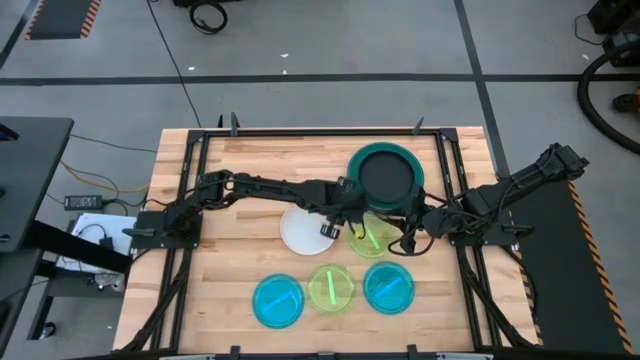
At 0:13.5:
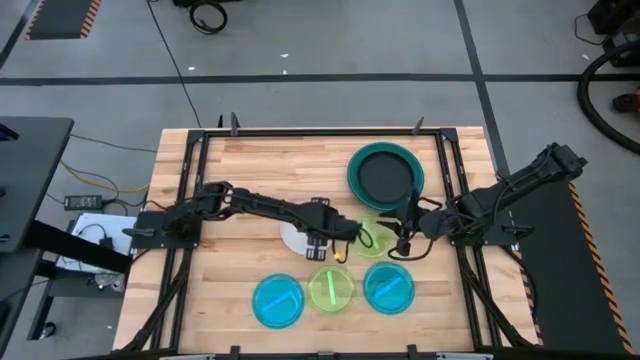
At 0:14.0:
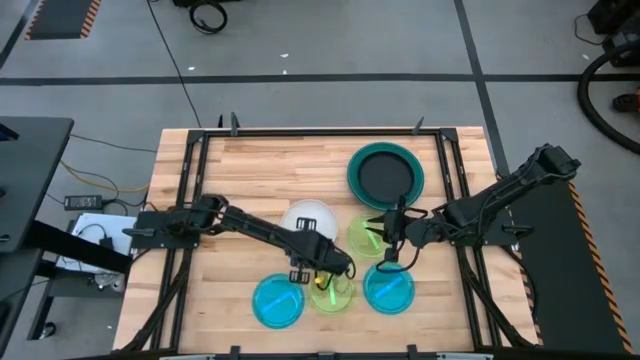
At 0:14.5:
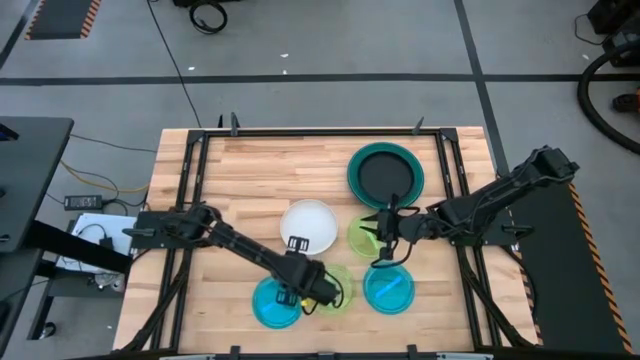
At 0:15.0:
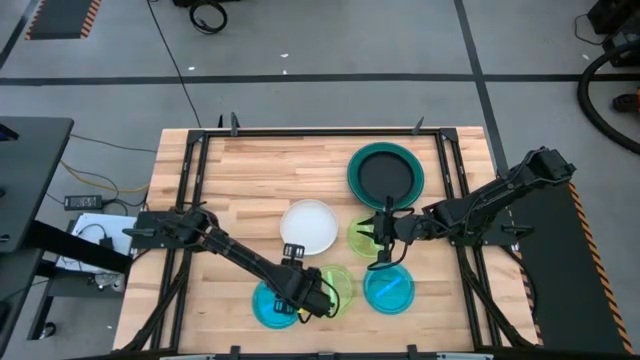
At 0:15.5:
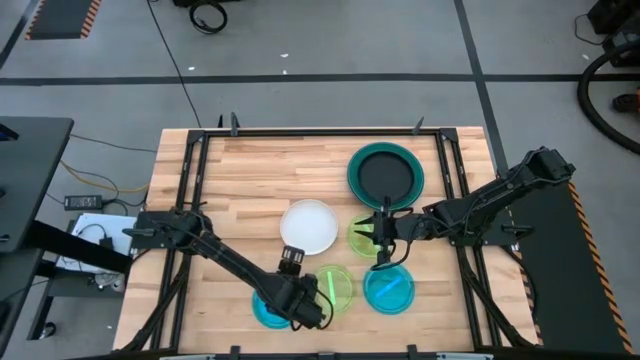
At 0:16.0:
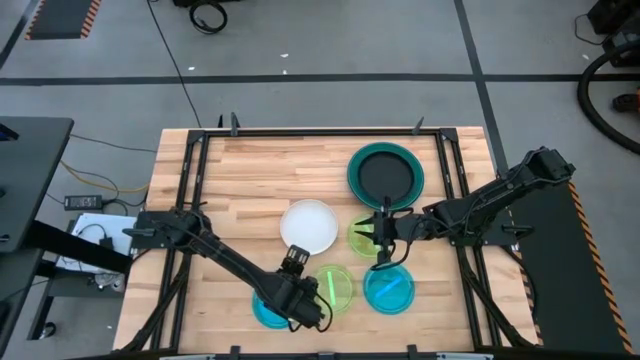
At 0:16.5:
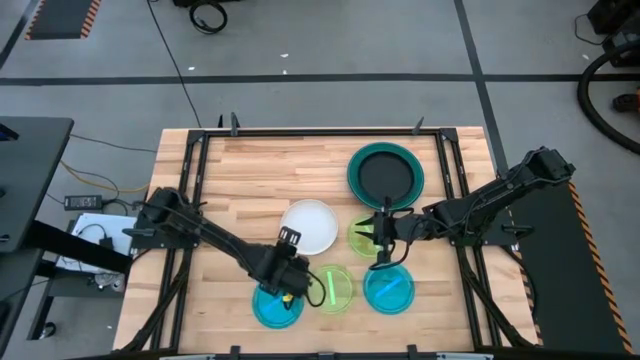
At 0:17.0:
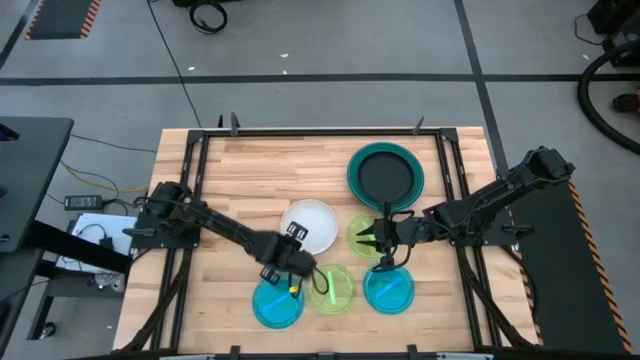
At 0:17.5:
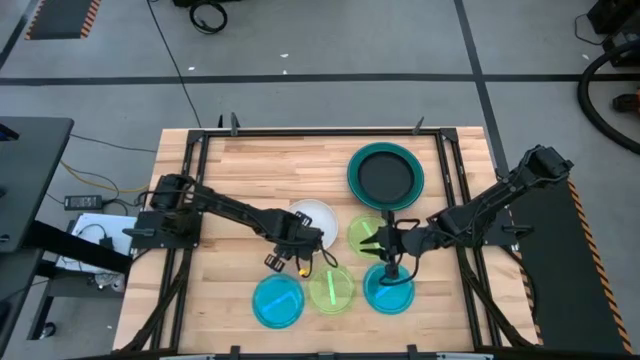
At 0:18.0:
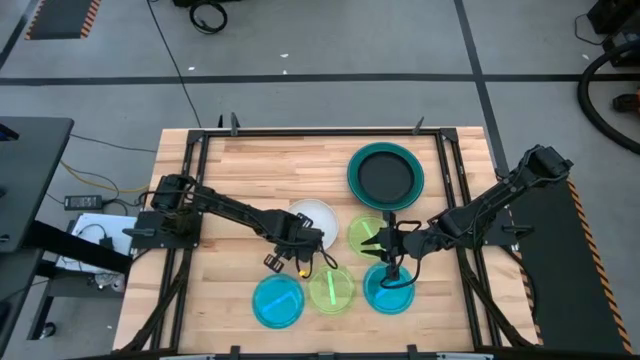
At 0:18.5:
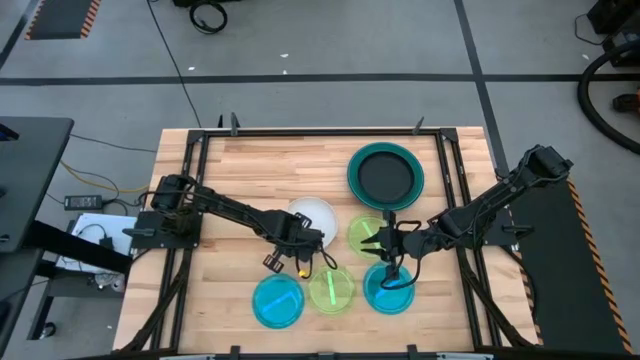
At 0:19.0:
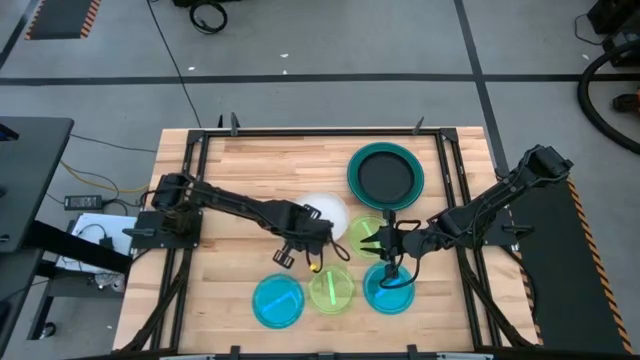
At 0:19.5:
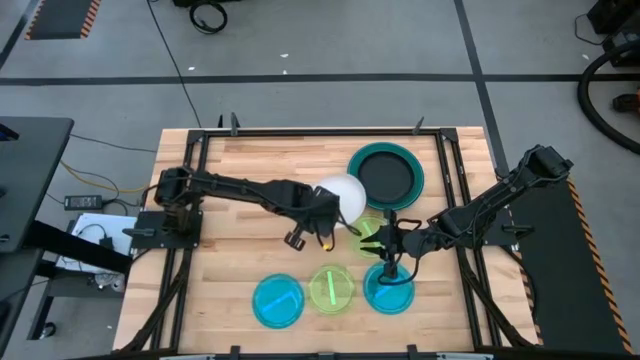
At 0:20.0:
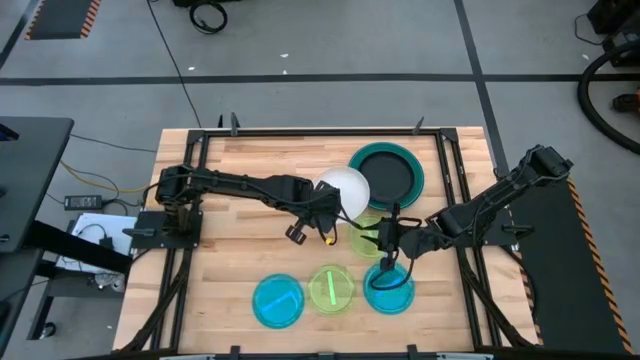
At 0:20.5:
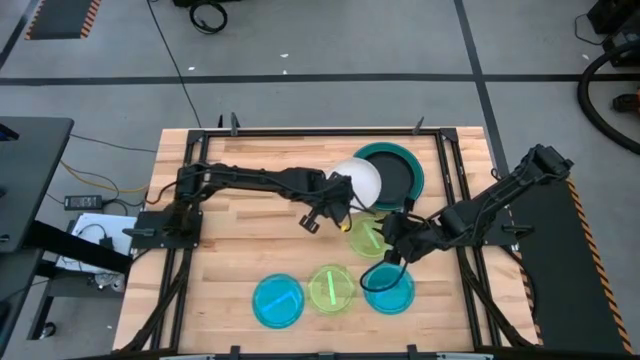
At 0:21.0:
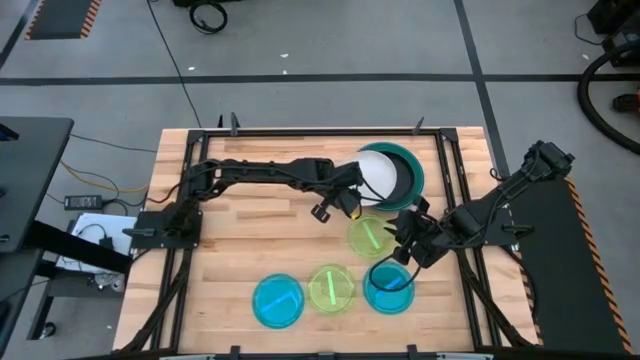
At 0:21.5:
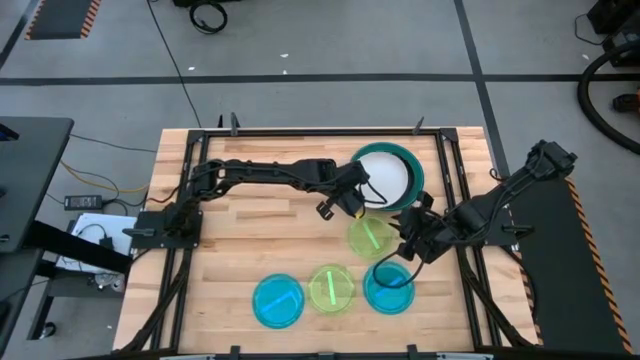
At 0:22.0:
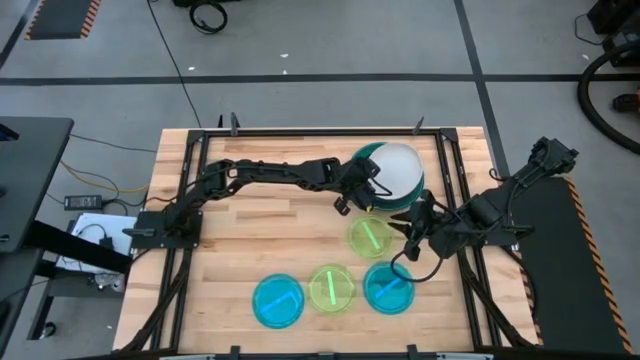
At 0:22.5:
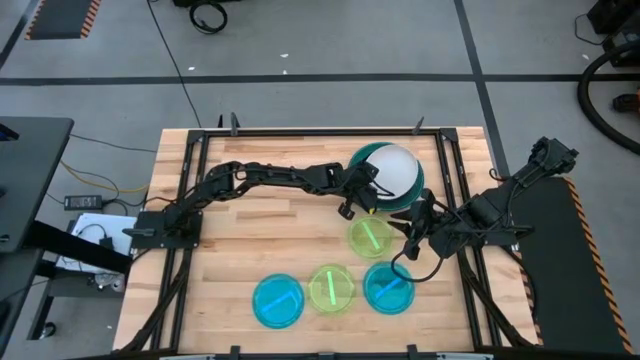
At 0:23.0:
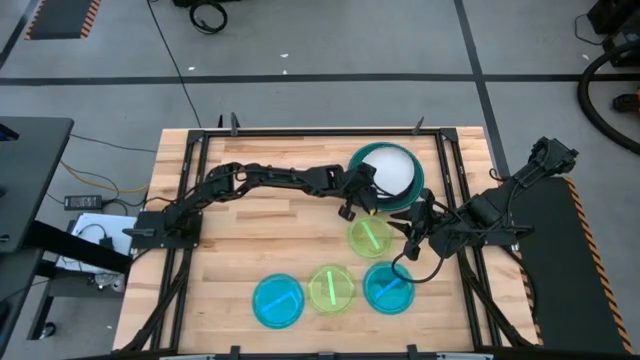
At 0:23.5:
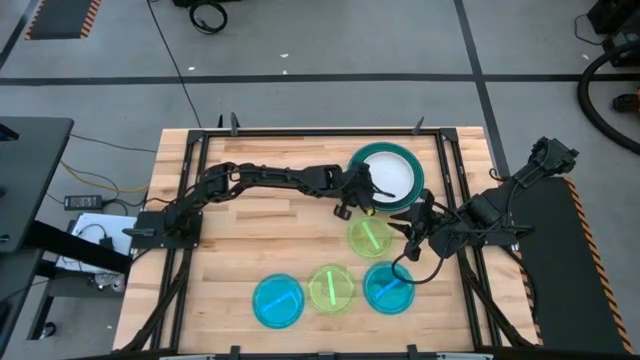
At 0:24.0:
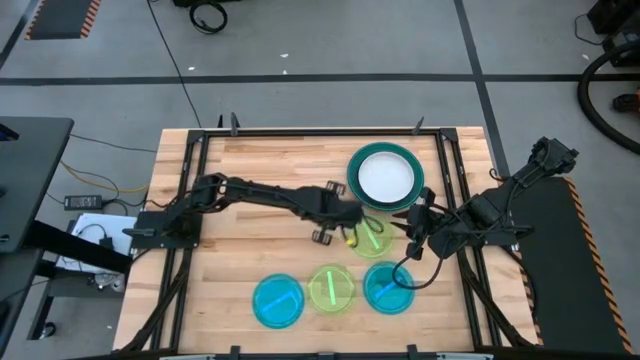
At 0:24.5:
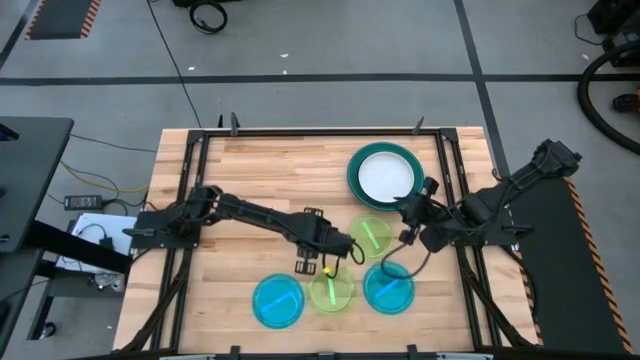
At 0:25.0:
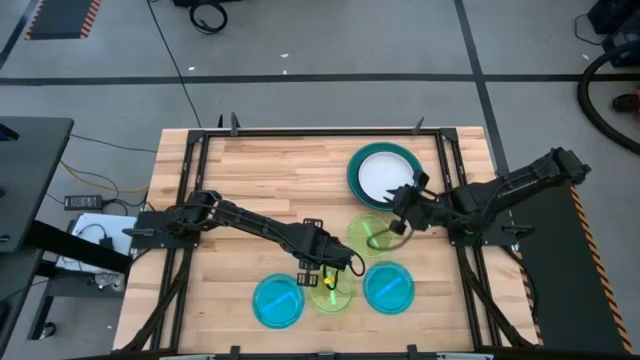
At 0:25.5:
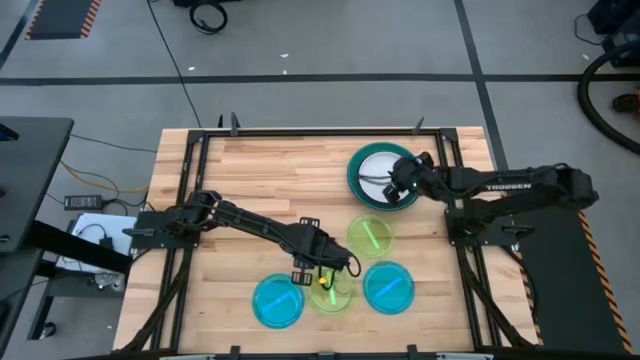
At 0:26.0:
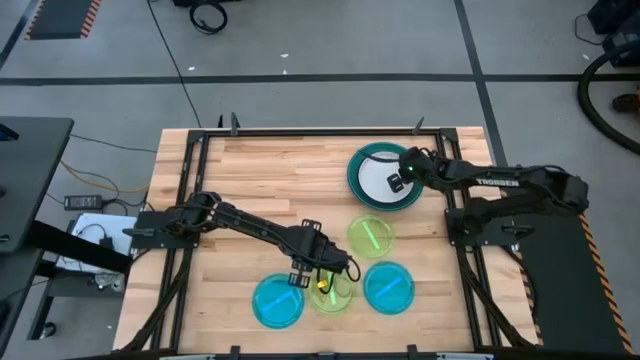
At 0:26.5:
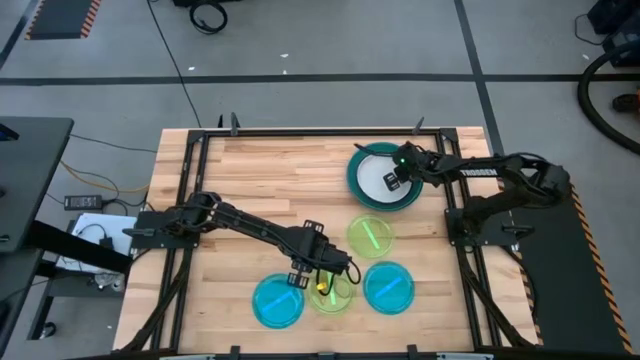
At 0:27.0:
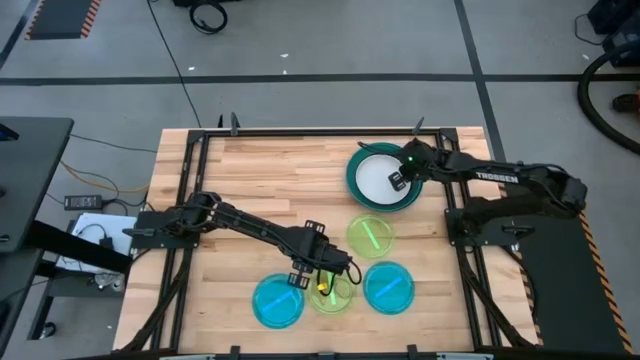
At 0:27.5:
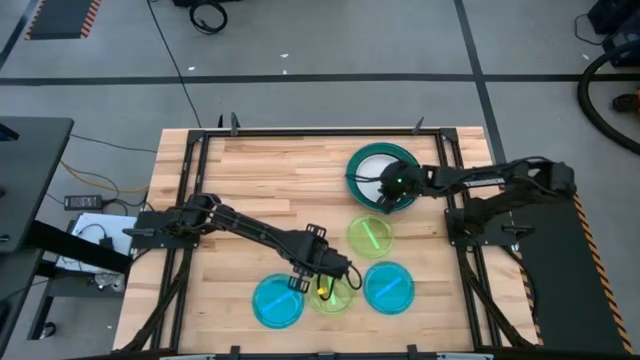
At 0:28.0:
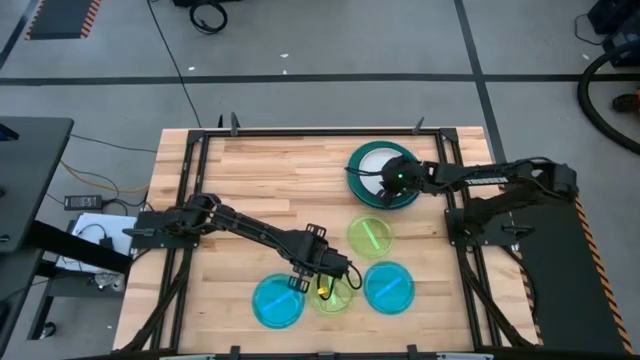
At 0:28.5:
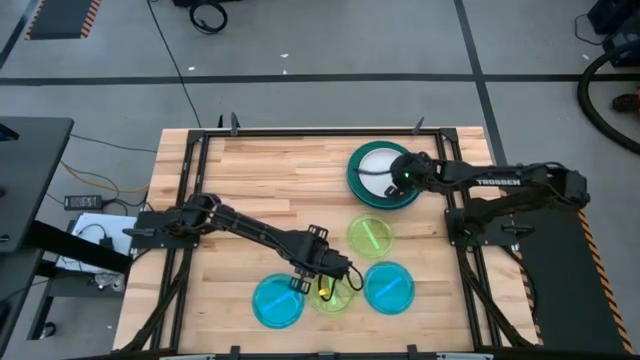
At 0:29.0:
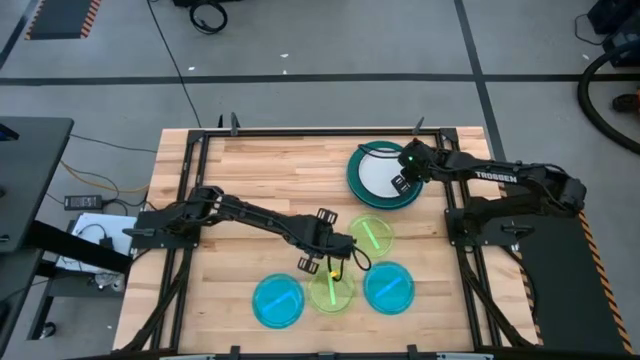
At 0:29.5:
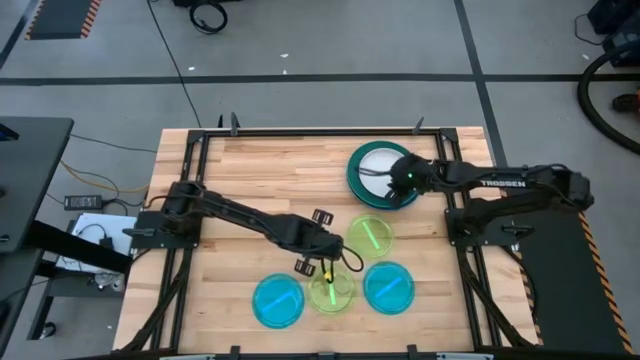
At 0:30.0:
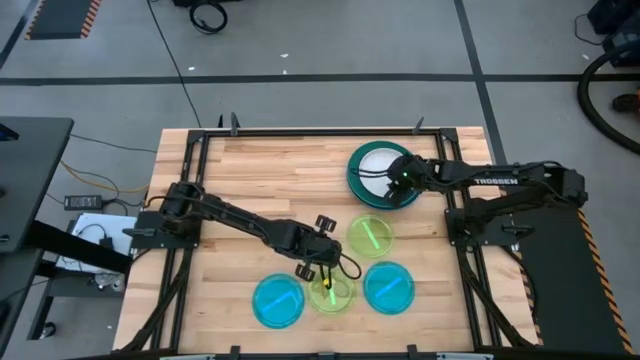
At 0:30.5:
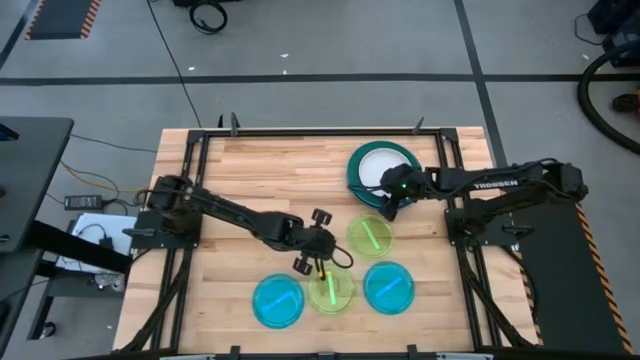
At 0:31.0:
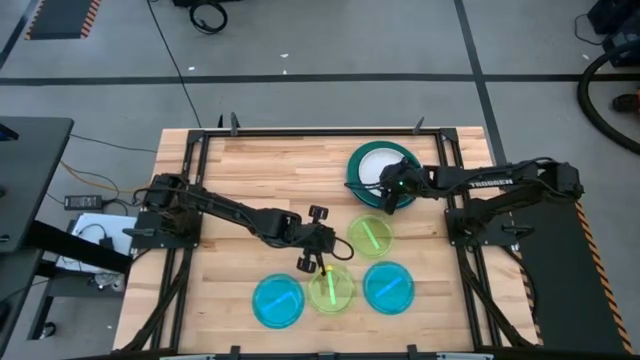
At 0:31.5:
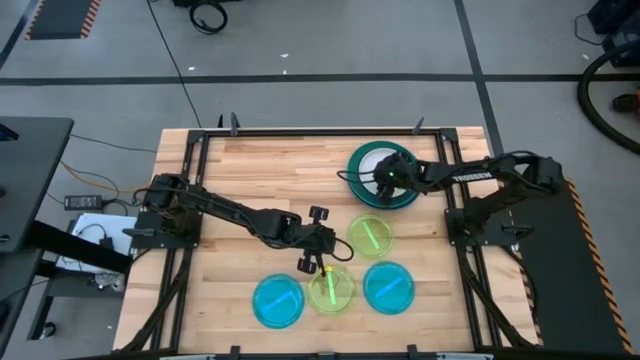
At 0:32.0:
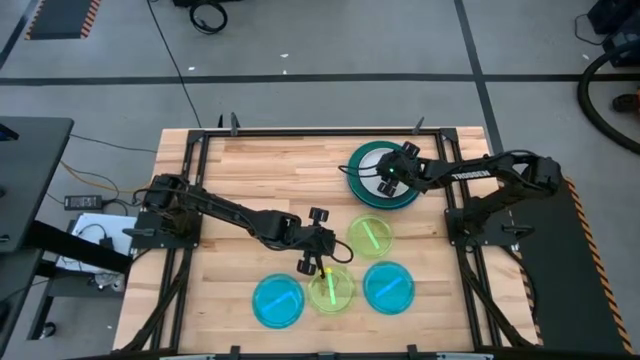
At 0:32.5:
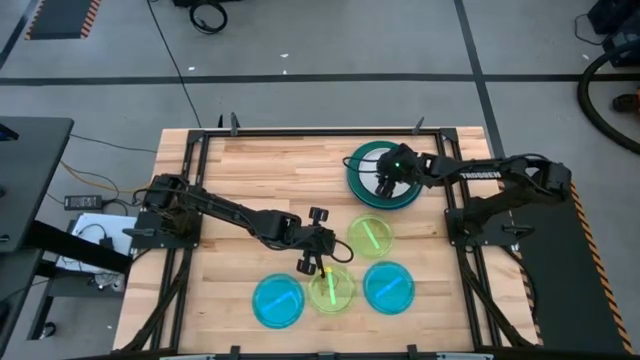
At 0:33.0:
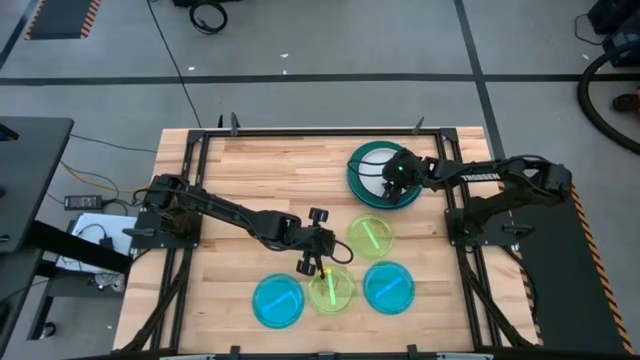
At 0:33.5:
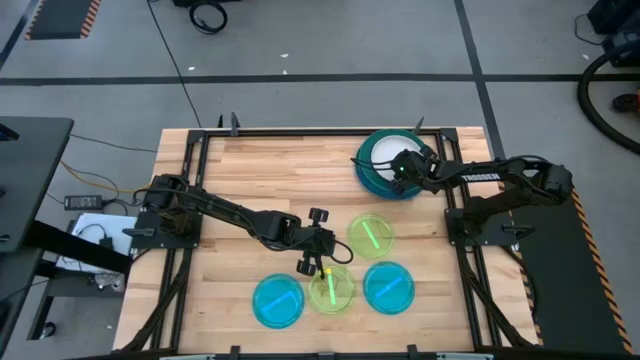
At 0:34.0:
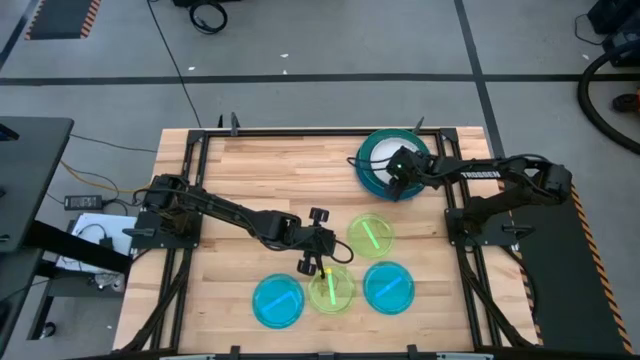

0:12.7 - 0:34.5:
Task: Stack plastic plates
Stack the white plate on the black plate
